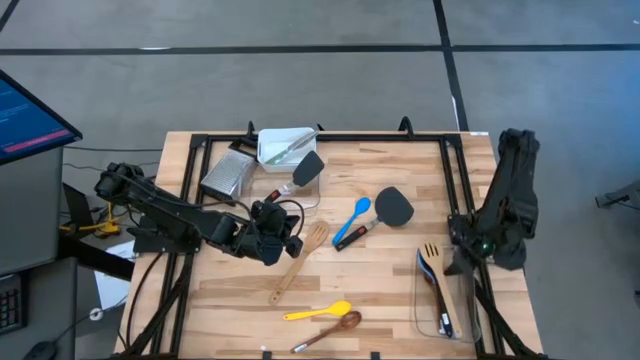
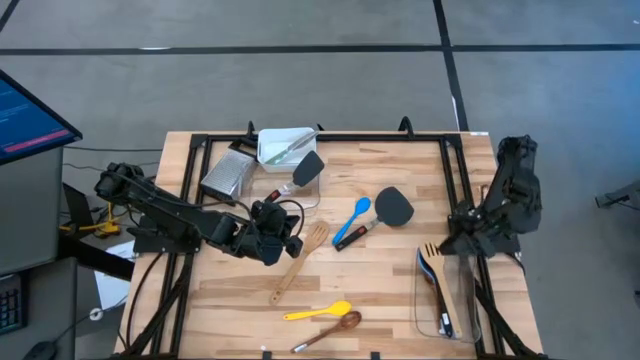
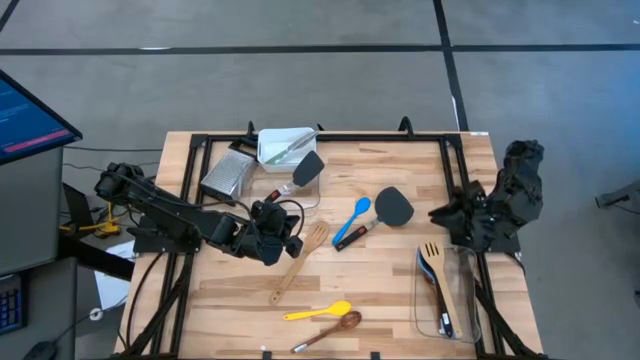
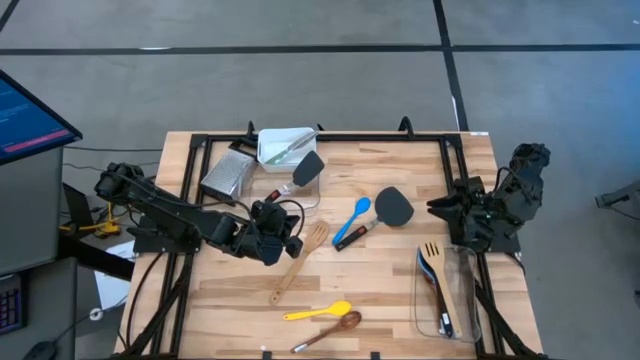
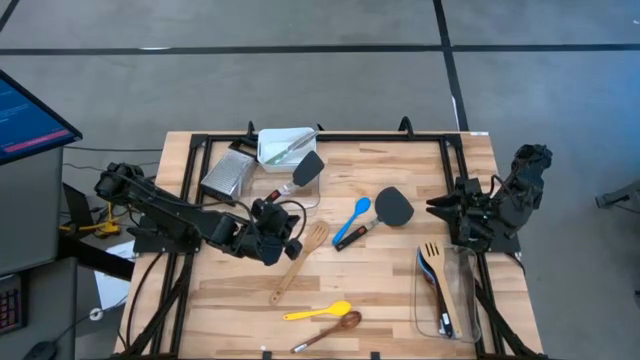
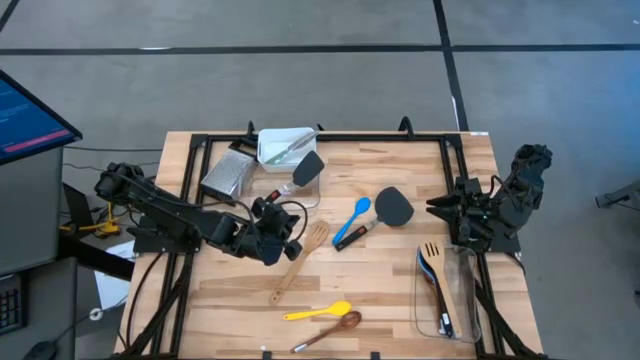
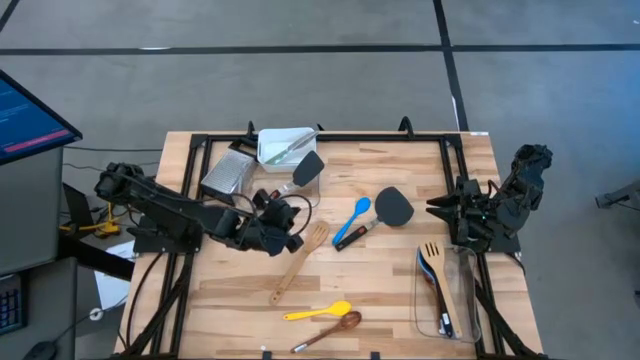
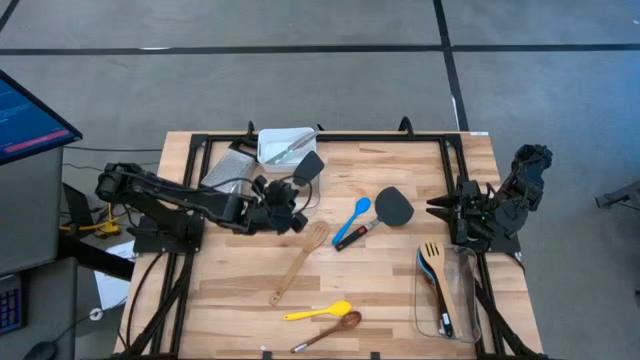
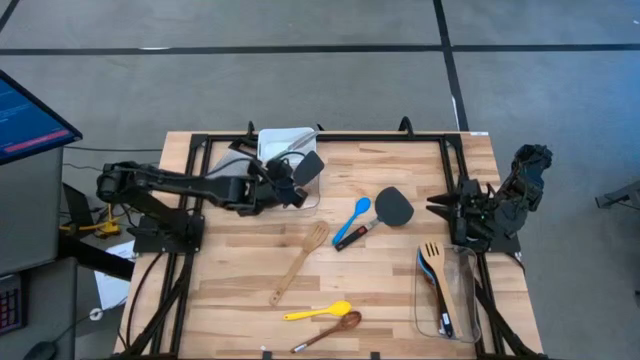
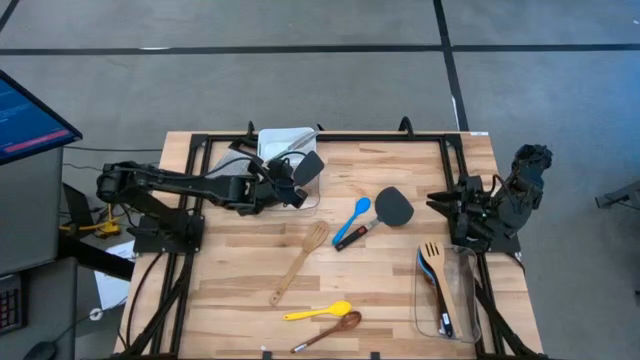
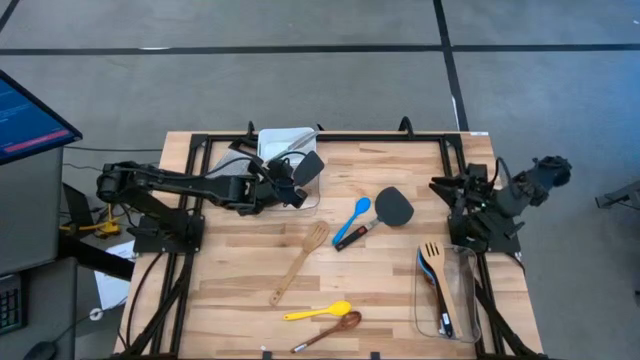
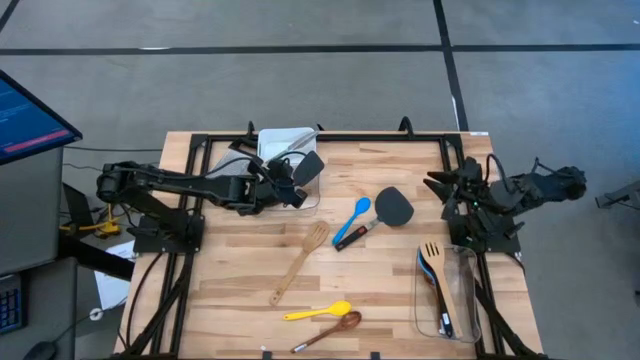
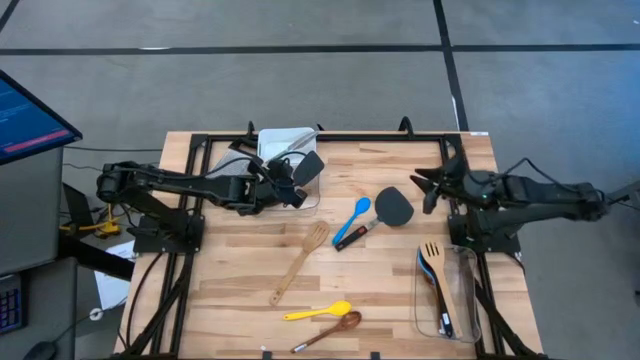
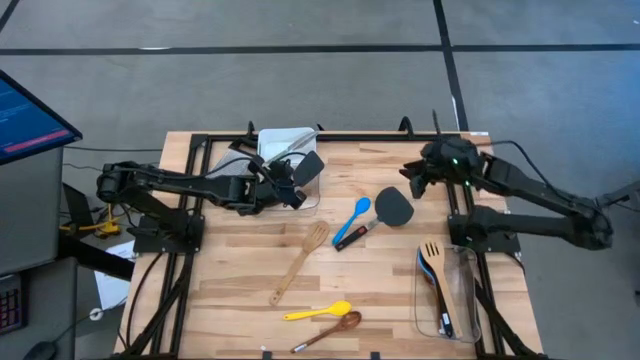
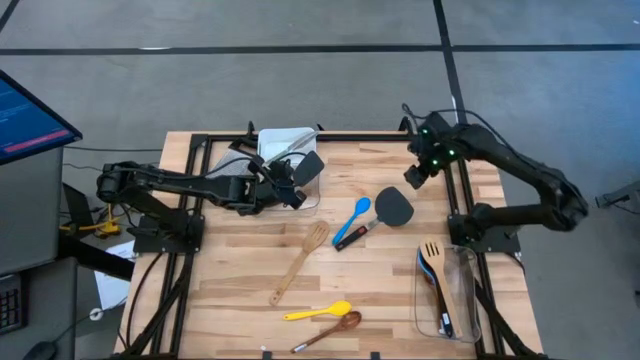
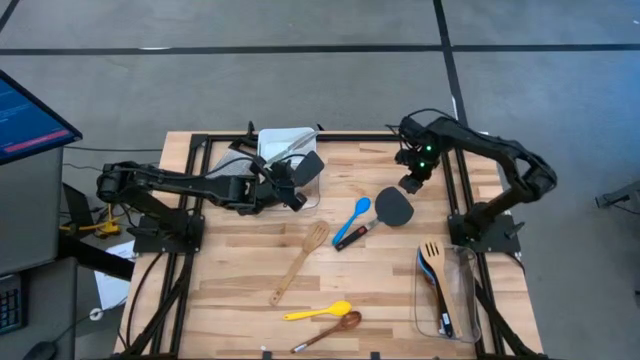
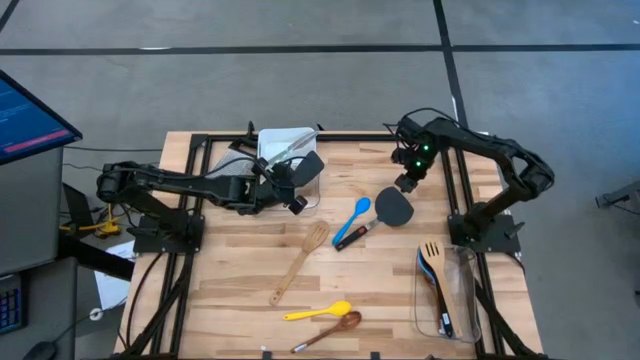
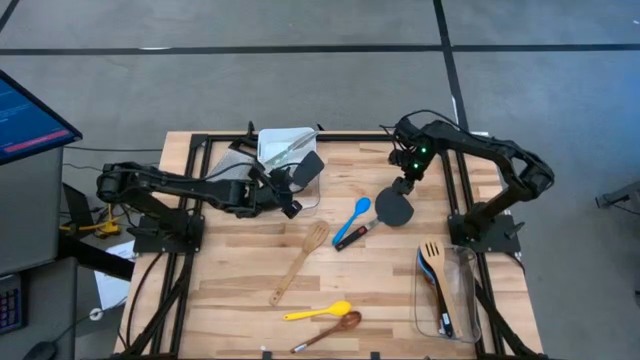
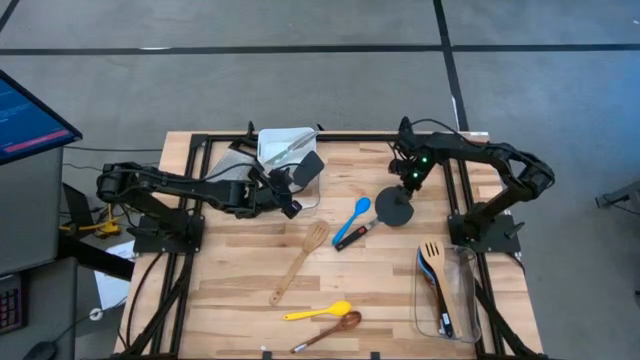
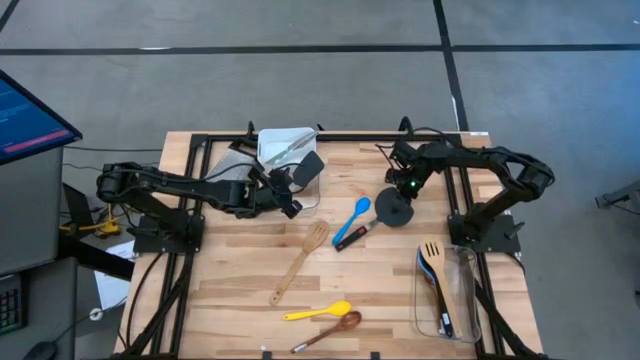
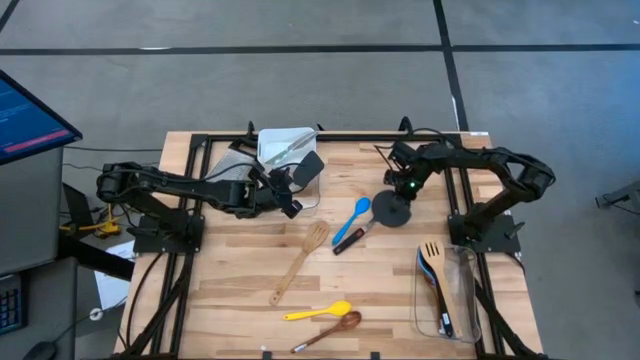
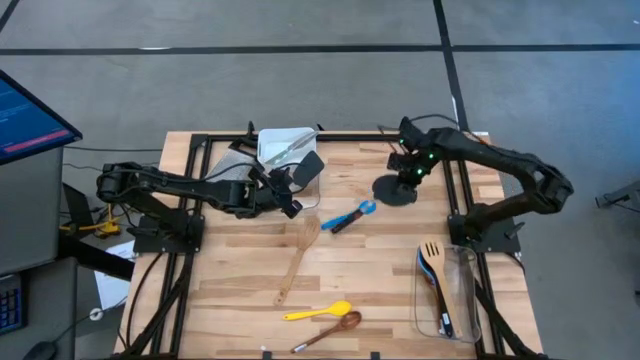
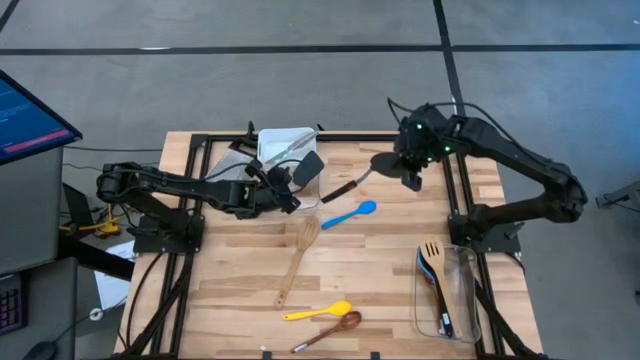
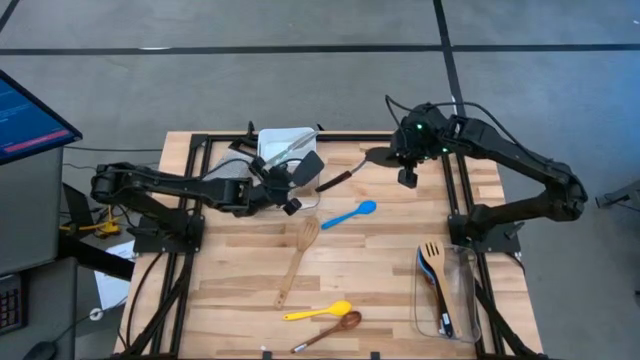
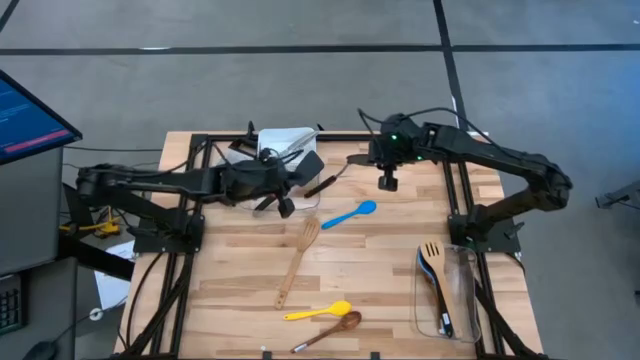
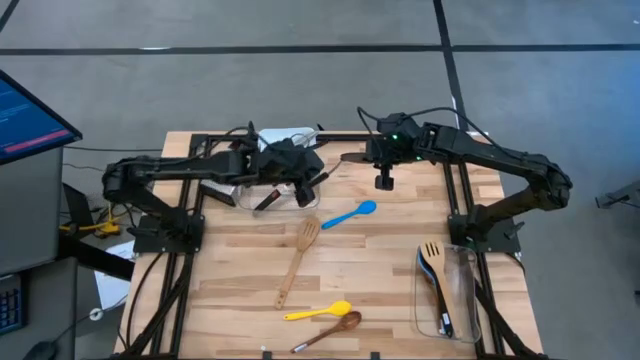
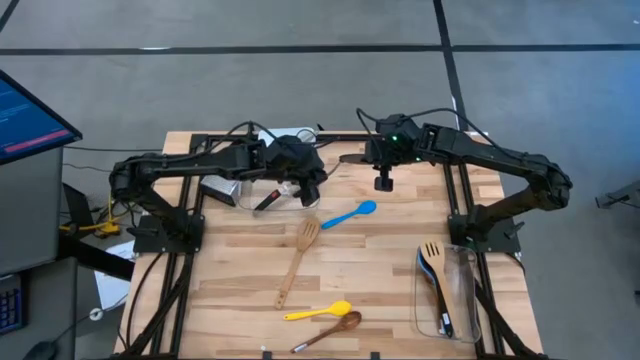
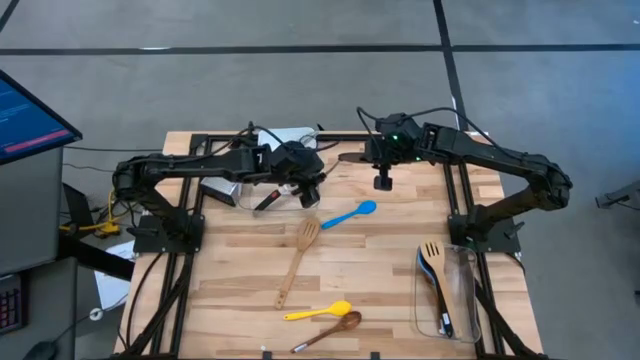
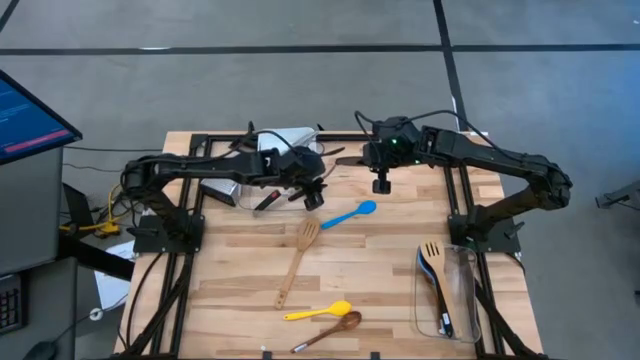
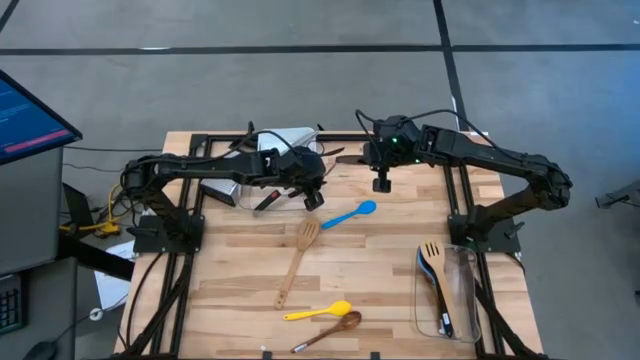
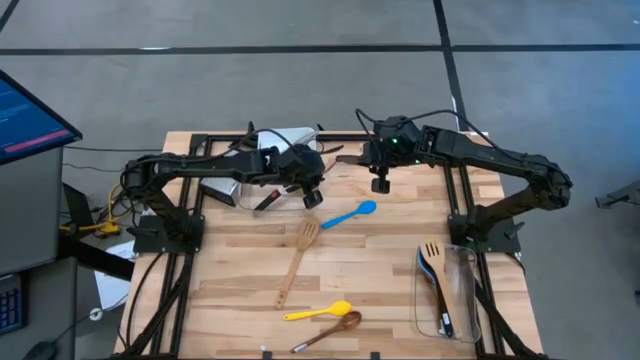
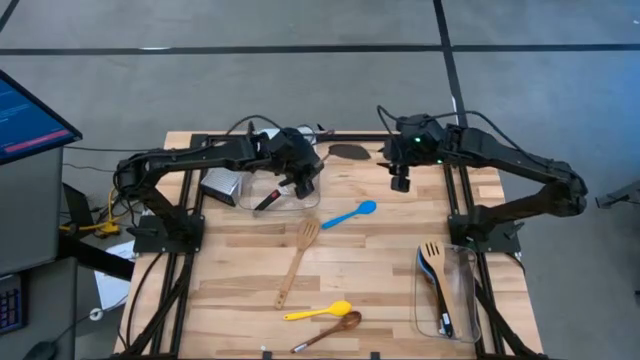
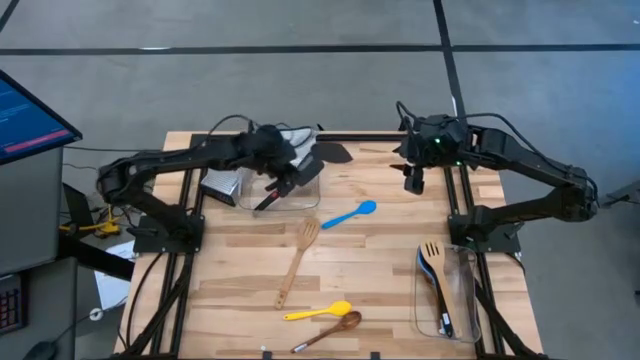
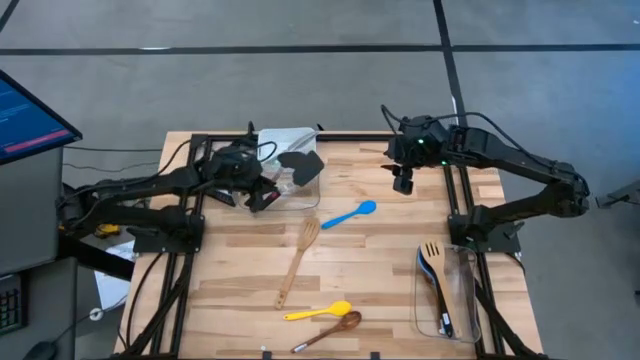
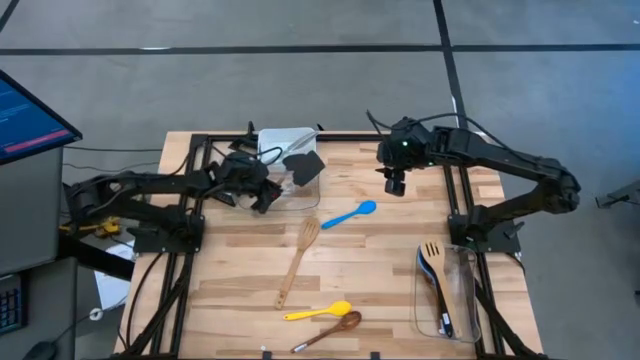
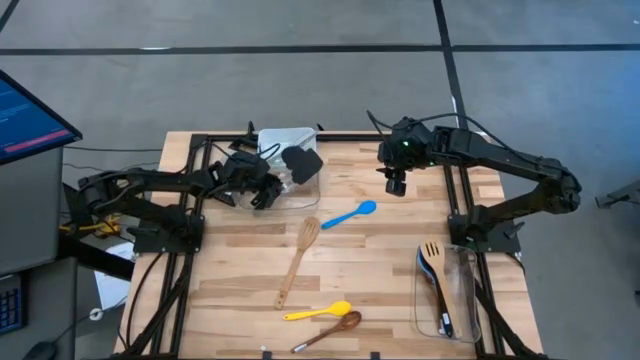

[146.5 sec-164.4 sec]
Task: Pick & Place Kitchen Items
Put the solid turner spatula into the top transparent bin

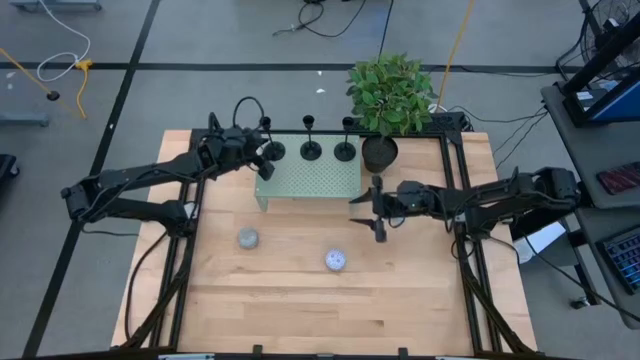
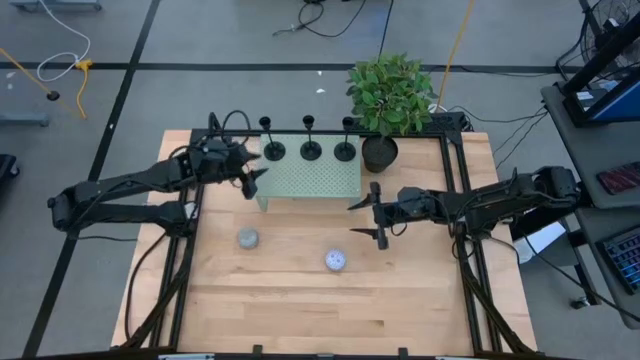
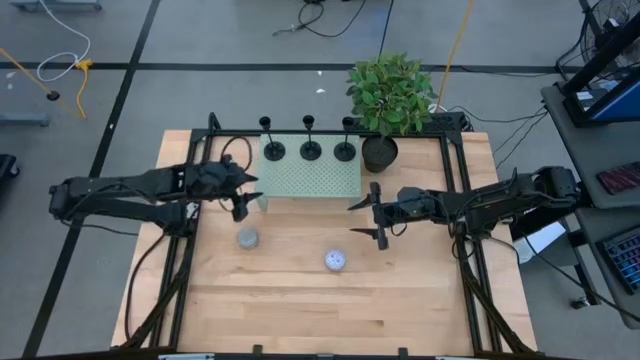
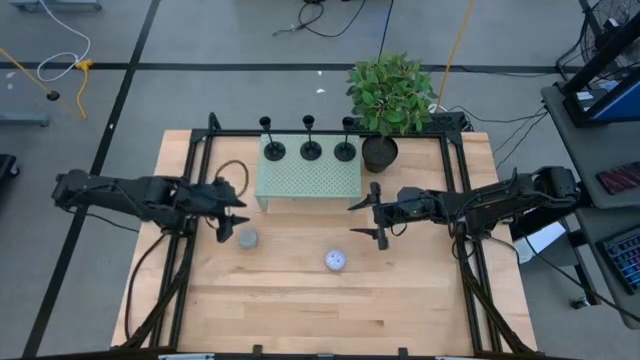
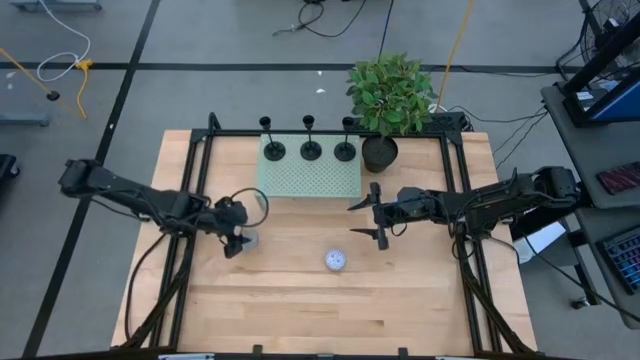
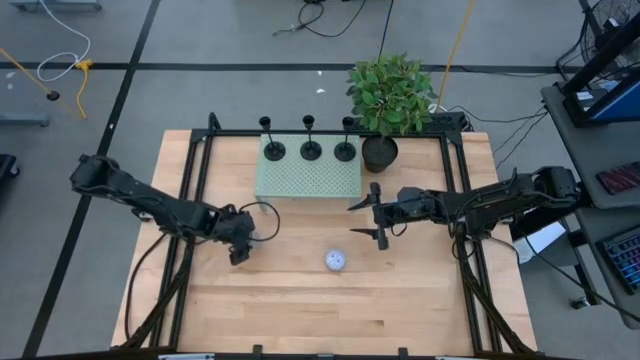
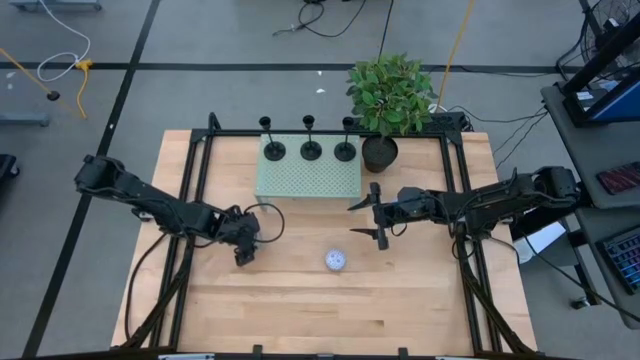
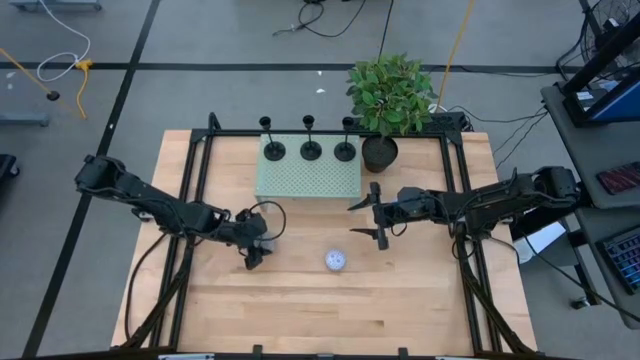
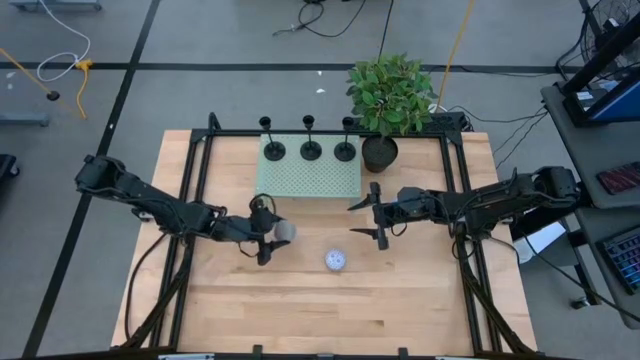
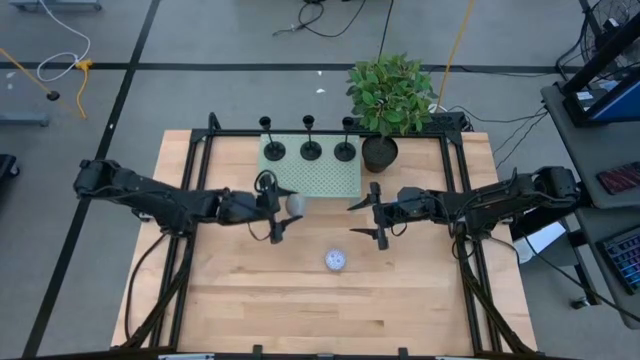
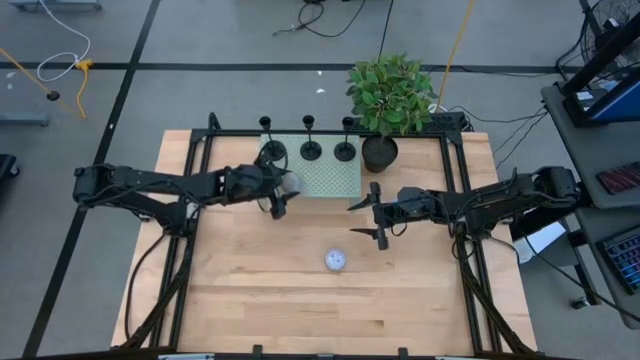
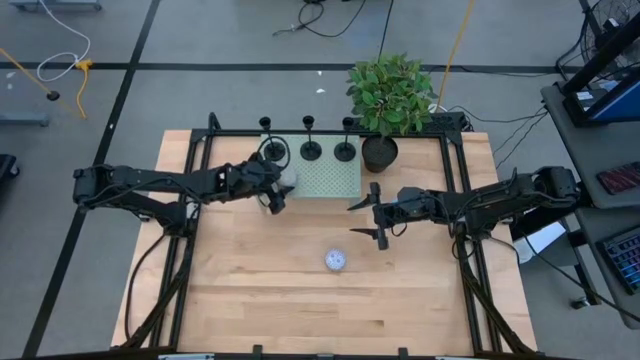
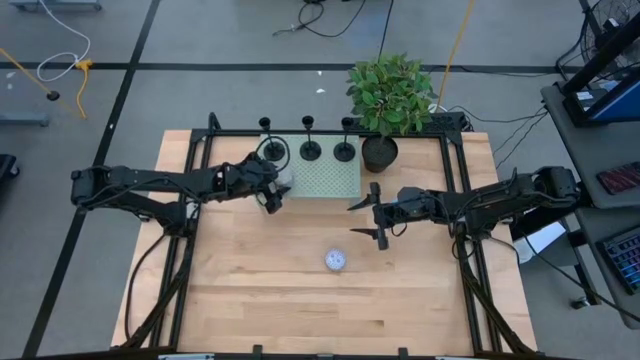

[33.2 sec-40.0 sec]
Task: Pick & Place candle stick holders
Put the blue scented candle on the shelf
